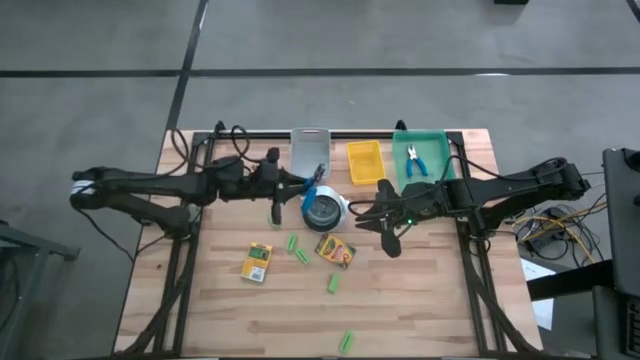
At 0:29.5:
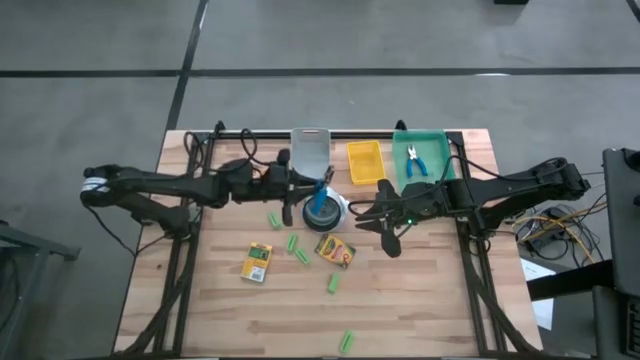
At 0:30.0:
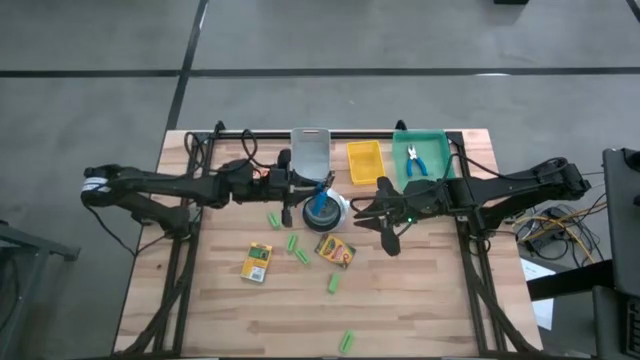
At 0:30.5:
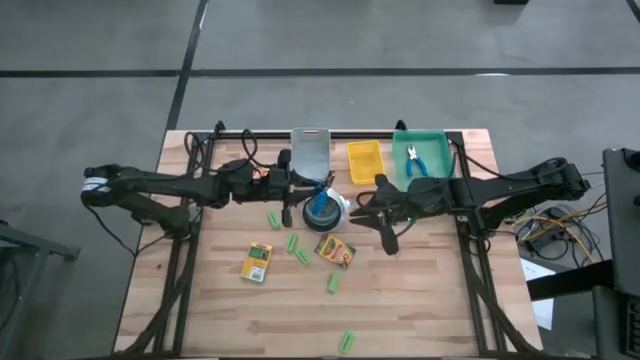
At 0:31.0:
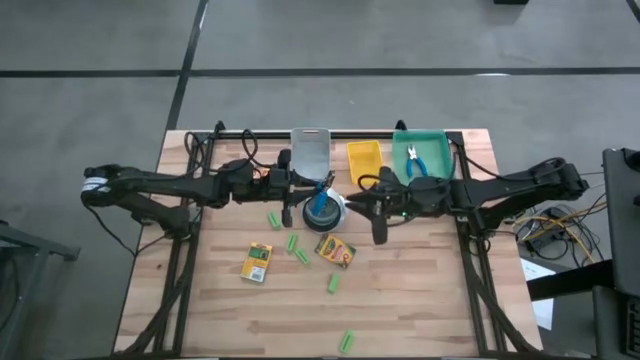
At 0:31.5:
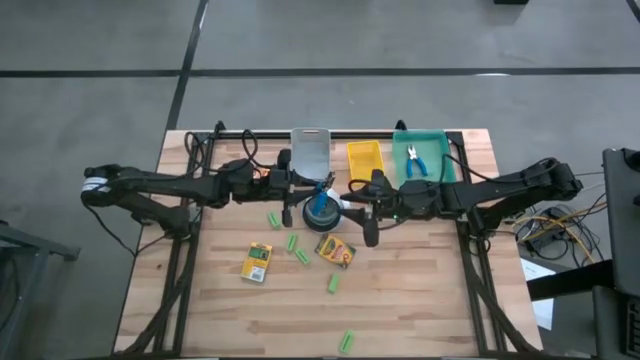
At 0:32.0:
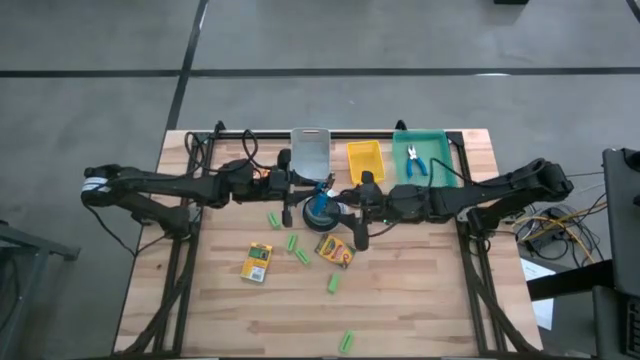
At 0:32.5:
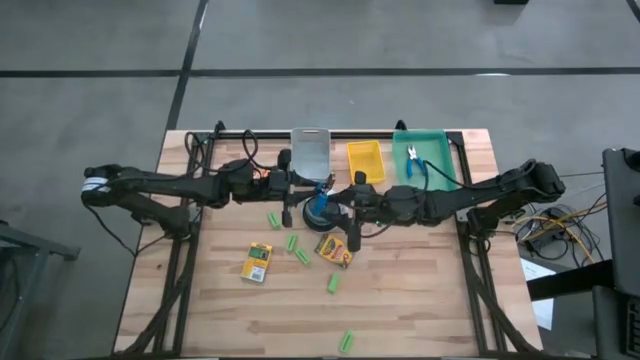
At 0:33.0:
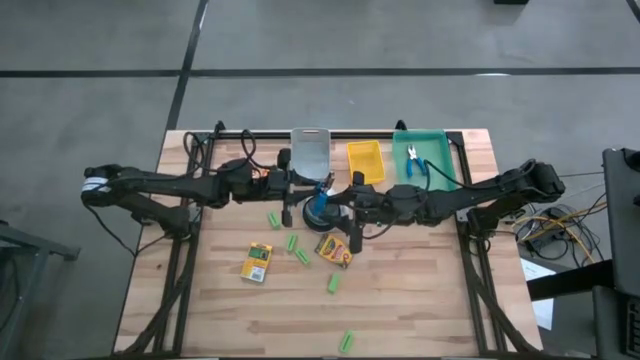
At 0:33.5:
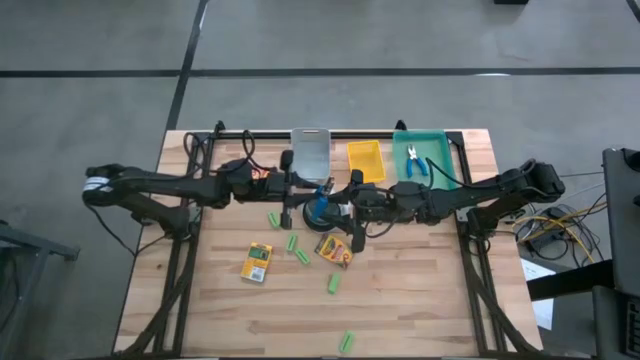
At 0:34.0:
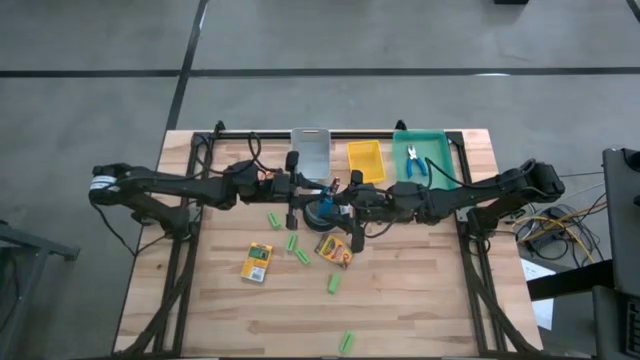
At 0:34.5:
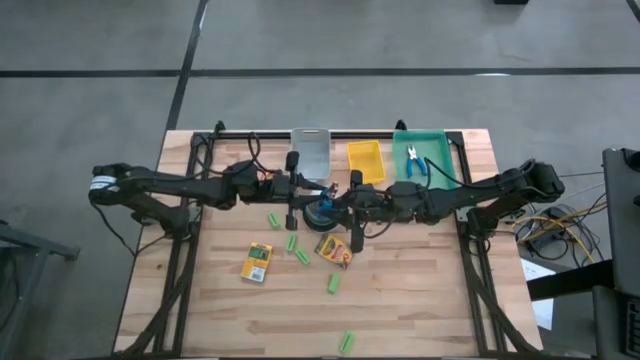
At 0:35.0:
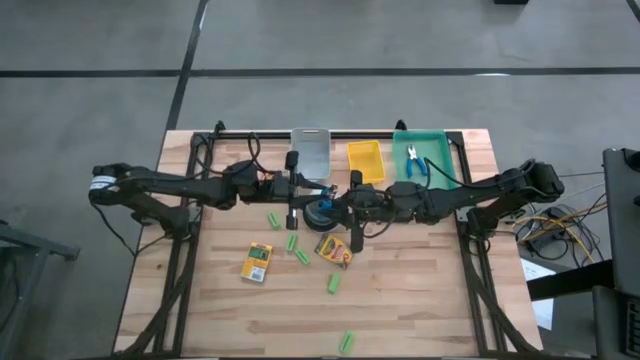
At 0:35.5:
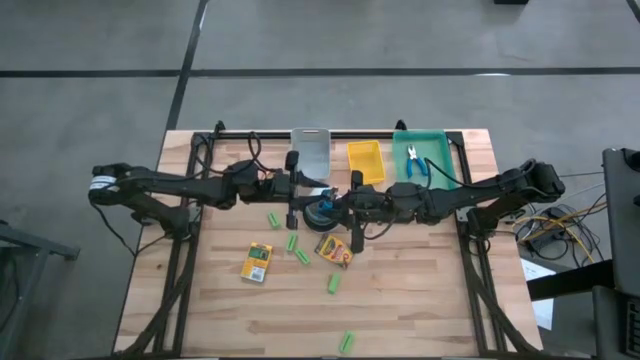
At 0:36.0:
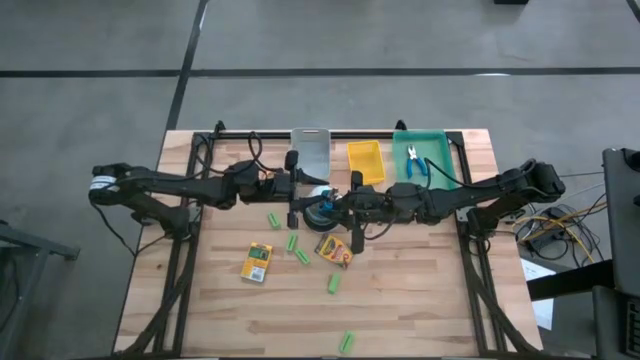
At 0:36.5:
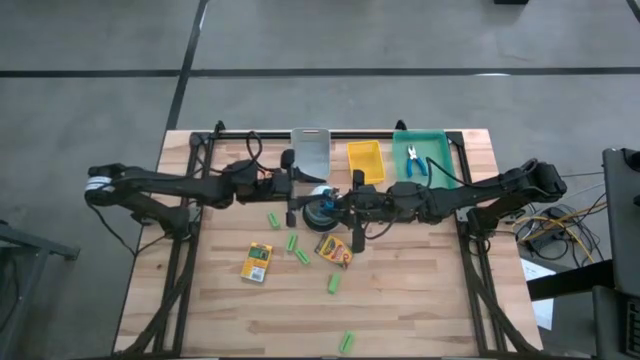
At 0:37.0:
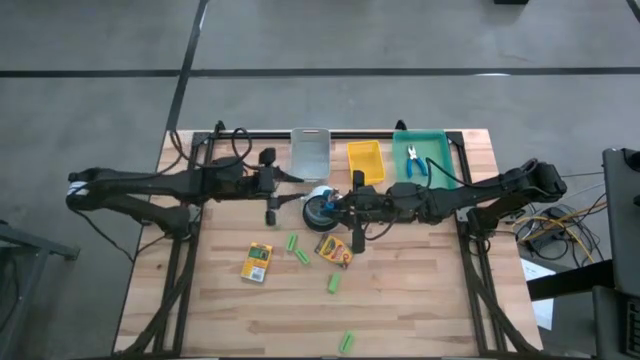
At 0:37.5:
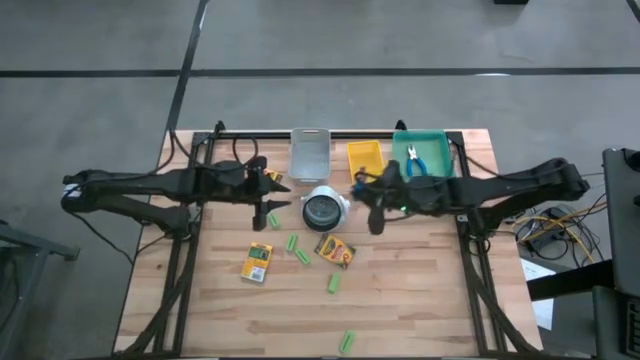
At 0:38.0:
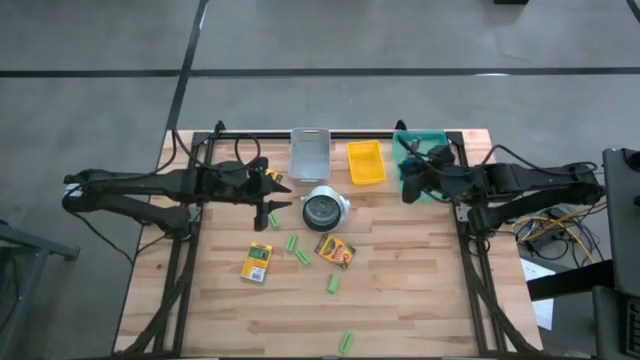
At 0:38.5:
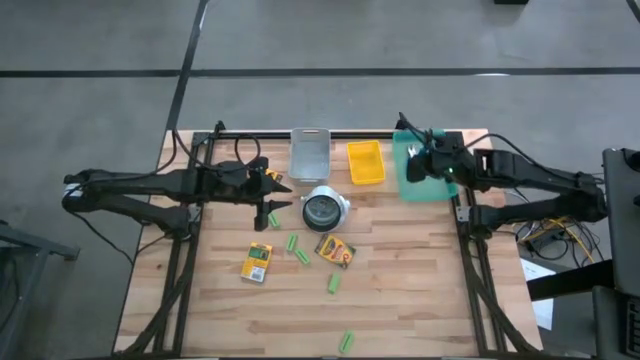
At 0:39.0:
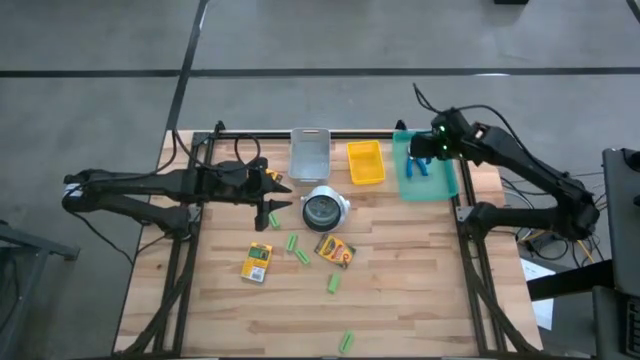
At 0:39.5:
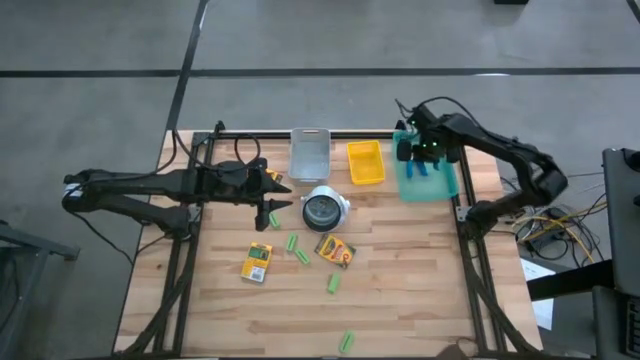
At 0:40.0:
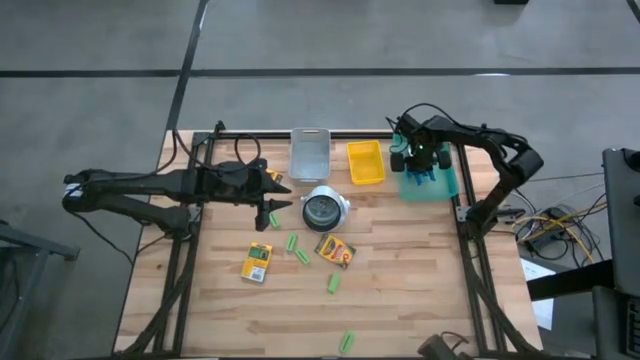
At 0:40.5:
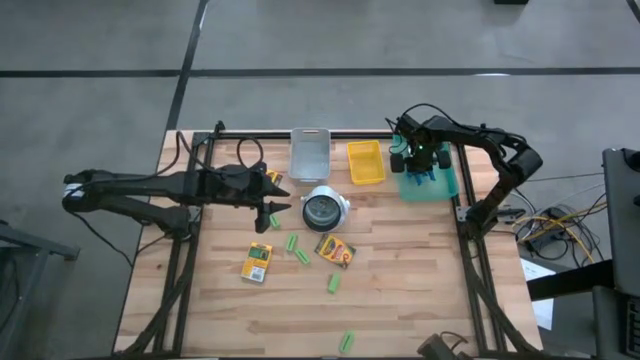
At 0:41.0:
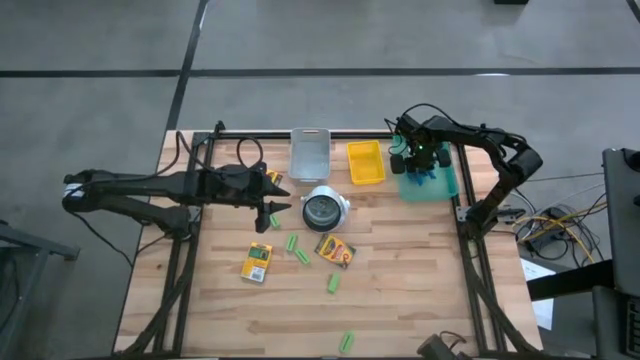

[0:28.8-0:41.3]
Task: Pick & Place School Supplies
Put the blue punch plier into the green bin

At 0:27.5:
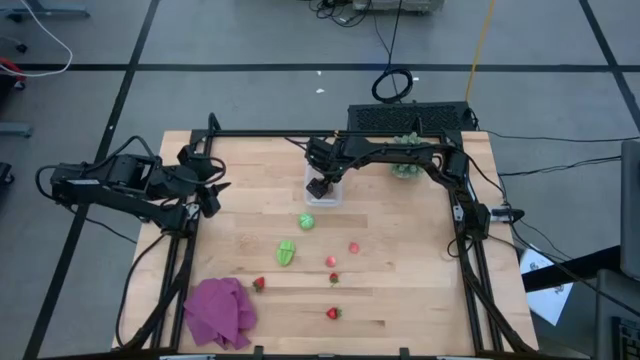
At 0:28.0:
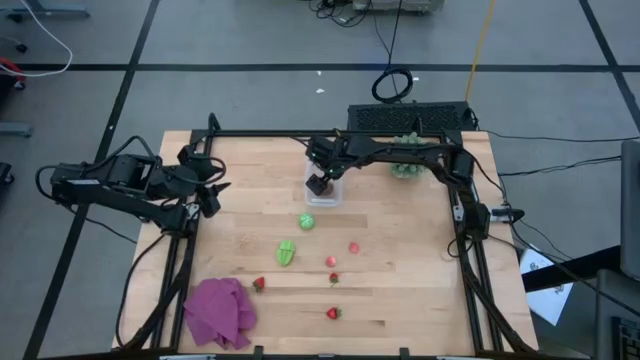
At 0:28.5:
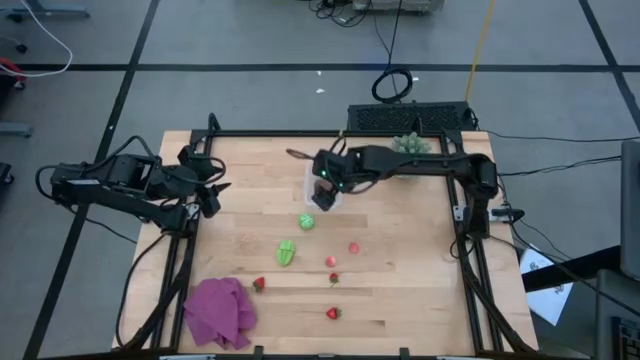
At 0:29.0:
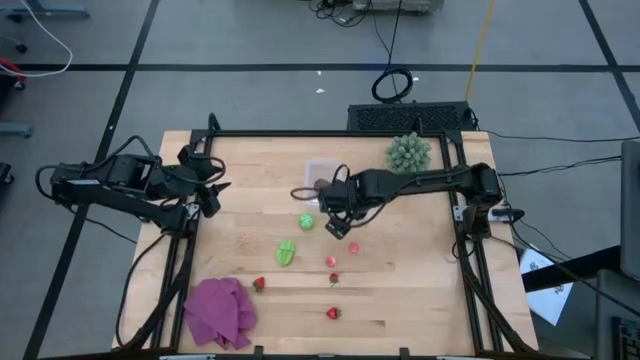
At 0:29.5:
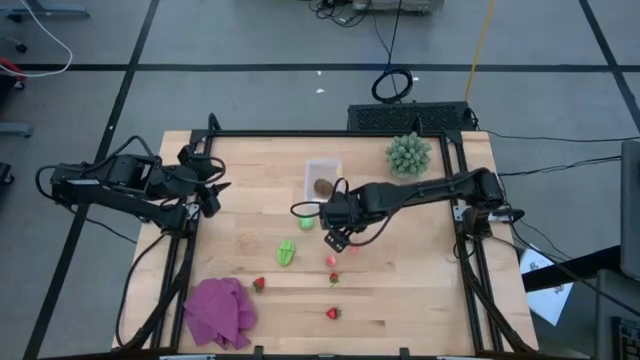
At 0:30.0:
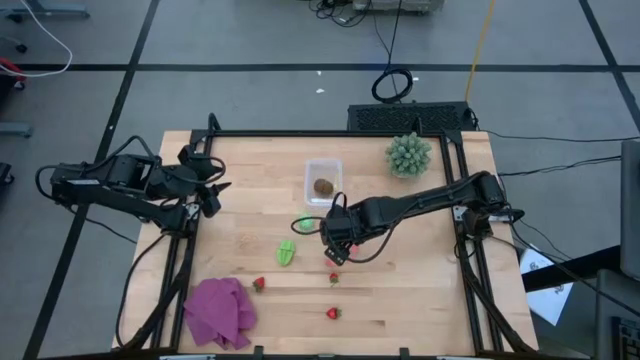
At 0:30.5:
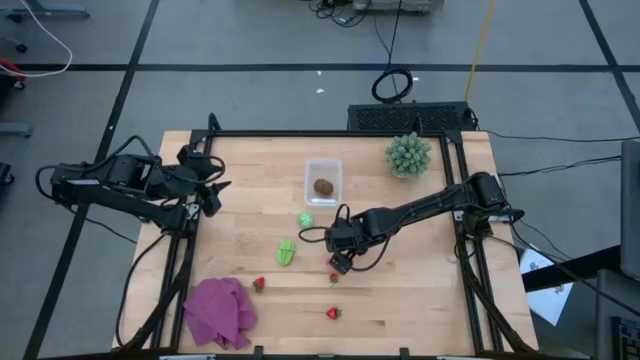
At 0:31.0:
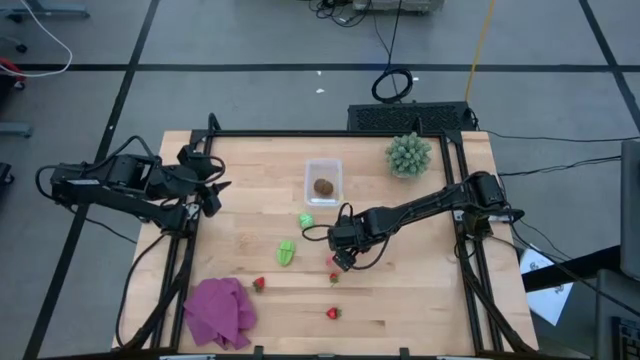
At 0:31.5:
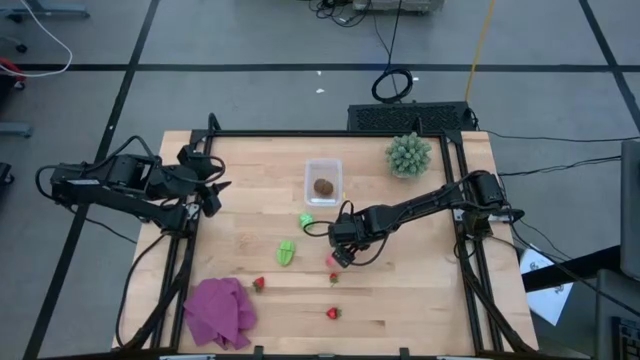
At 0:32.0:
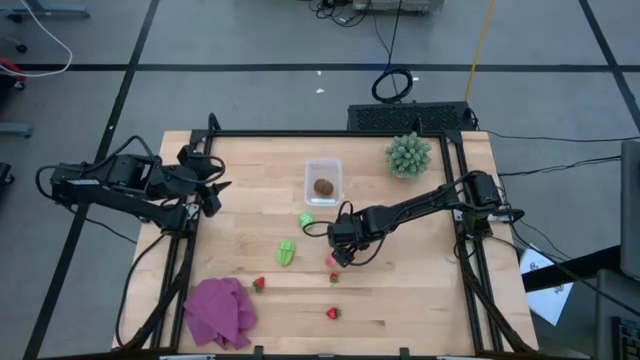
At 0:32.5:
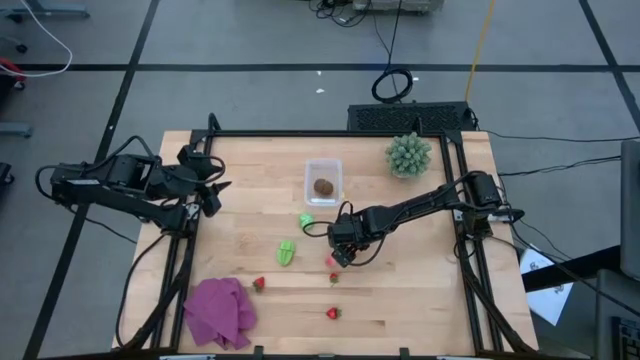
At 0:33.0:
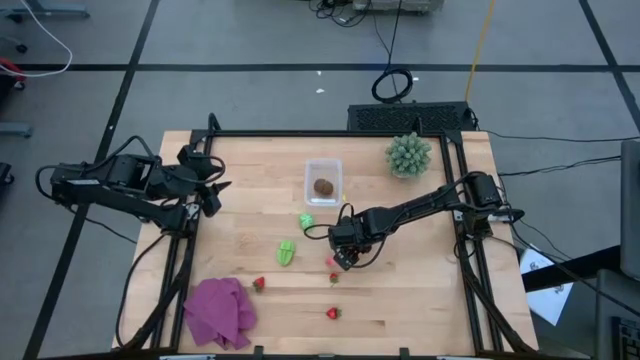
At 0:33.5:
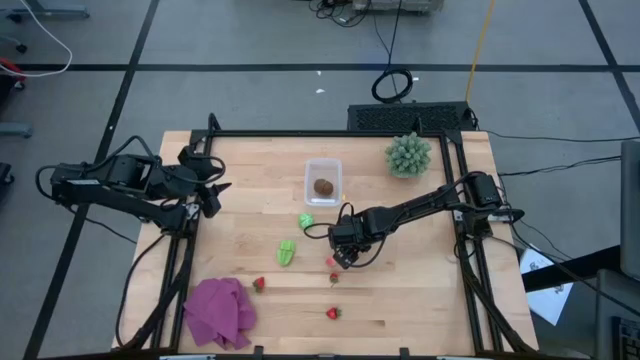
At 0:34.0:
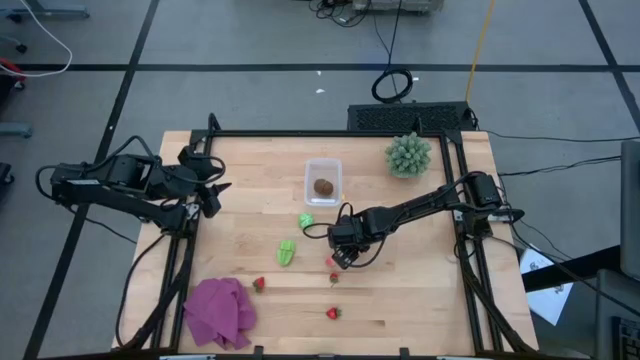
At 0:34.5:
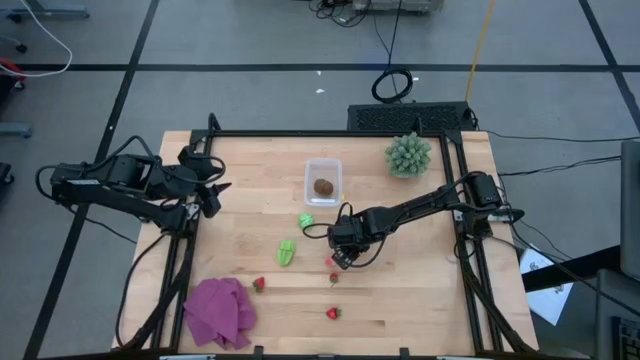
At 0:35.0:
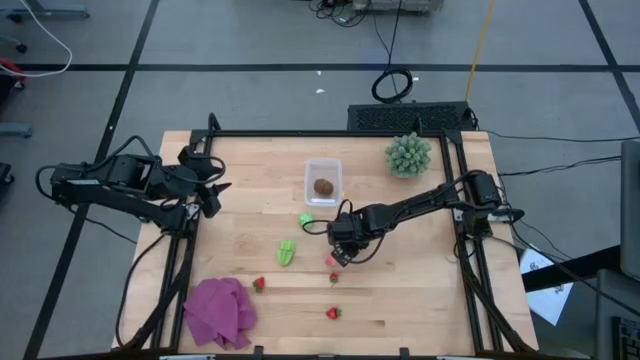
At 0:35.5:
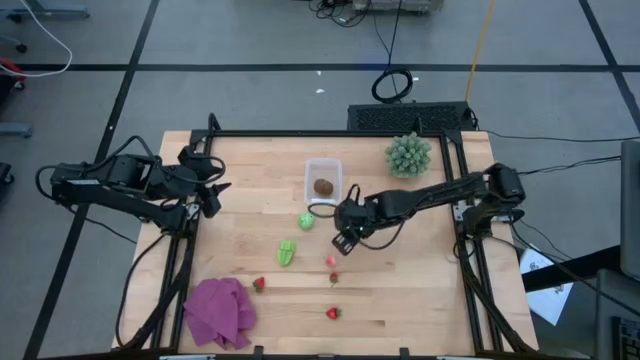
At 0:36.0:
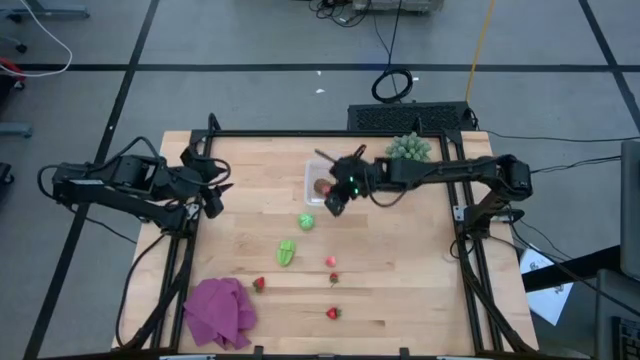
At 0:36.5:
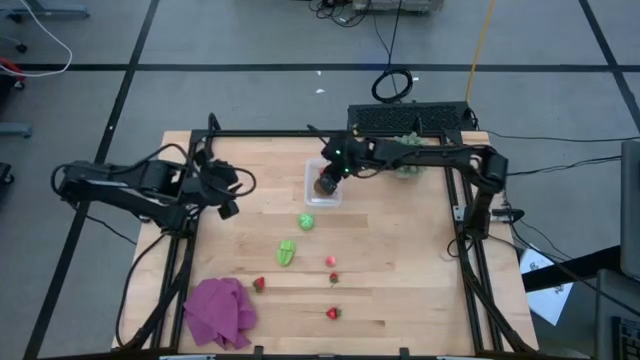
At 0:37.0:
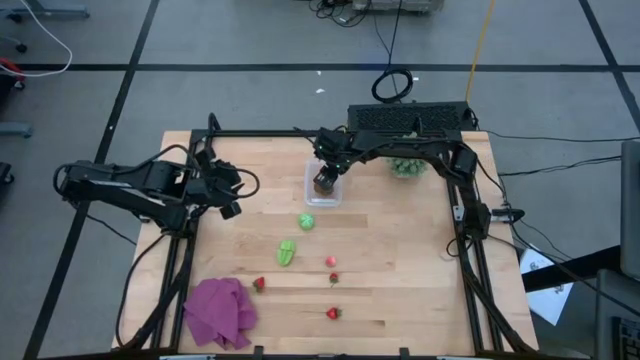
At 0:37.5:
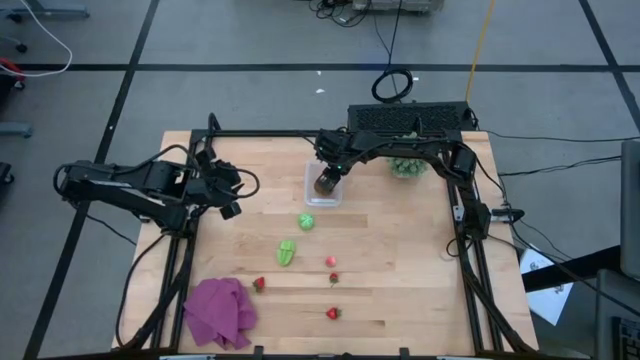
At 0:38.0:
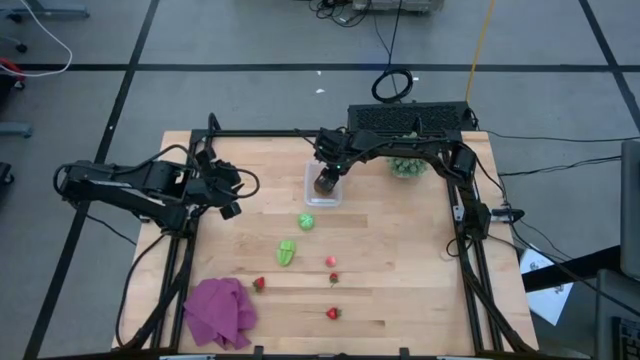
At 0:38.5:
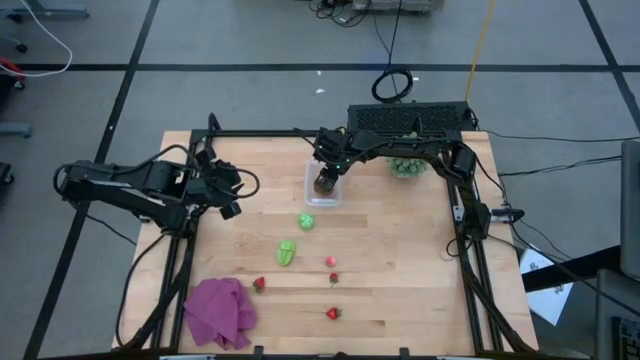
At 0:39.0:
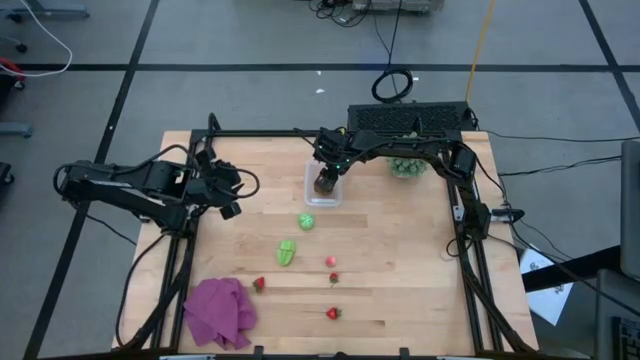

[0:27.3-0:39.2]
Task: Pick and placing Produce into tupperware
Put the right peach into the transparent bin
